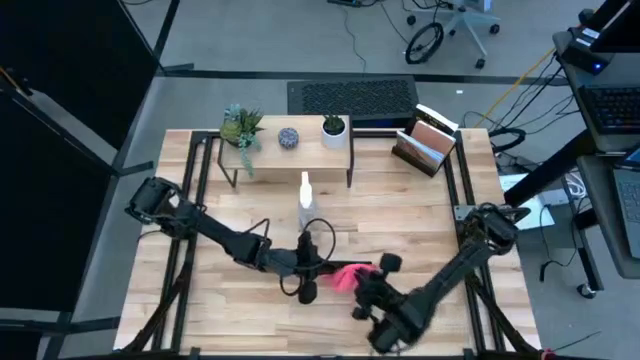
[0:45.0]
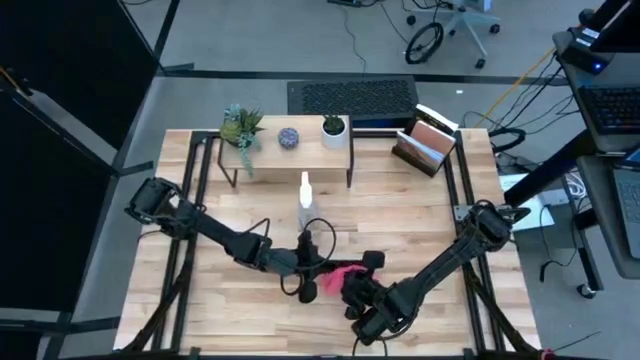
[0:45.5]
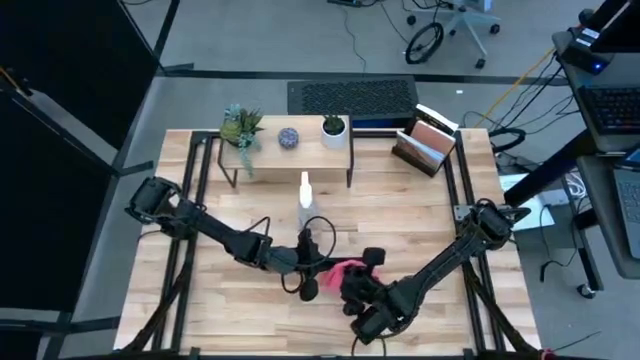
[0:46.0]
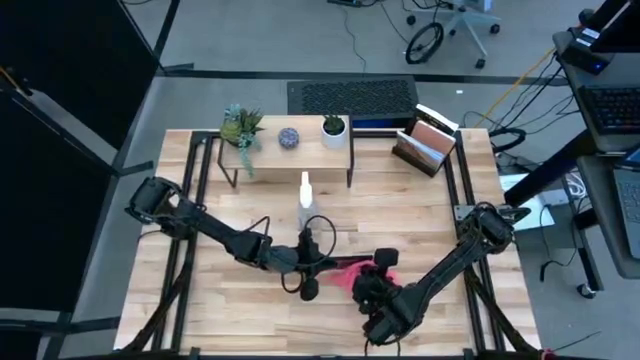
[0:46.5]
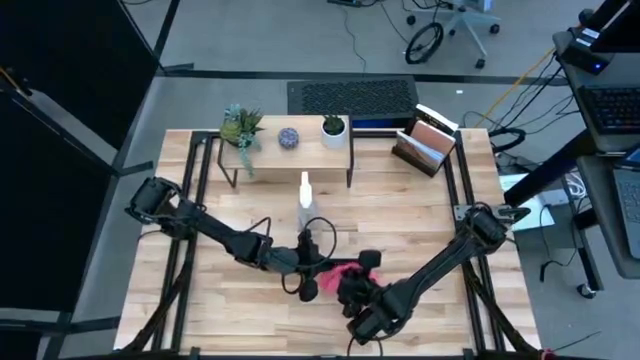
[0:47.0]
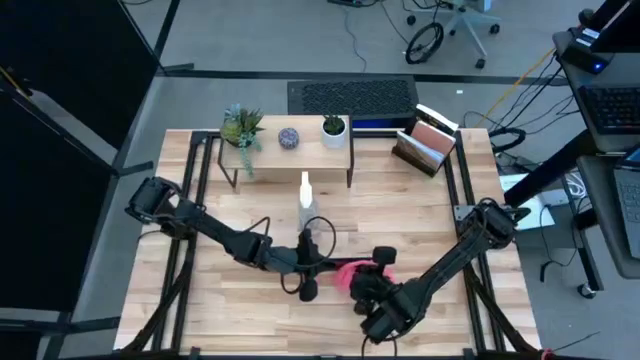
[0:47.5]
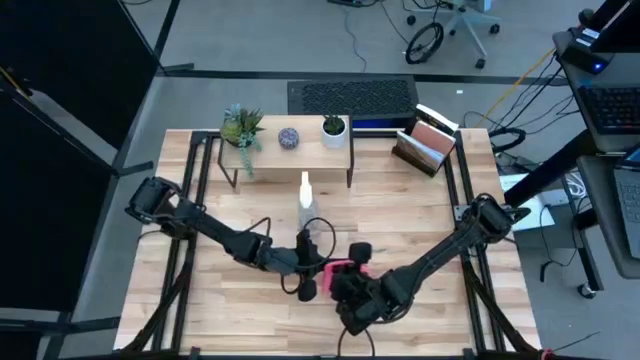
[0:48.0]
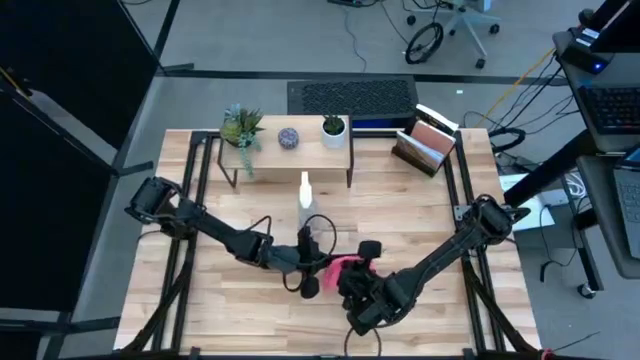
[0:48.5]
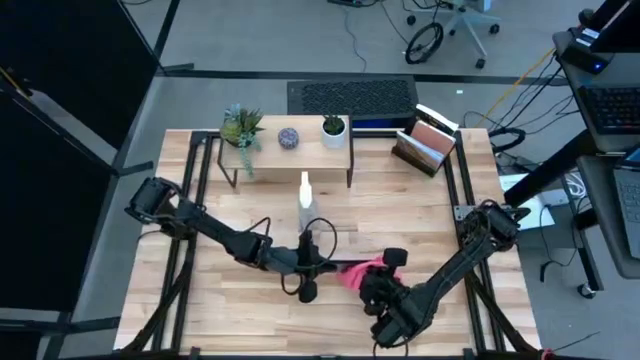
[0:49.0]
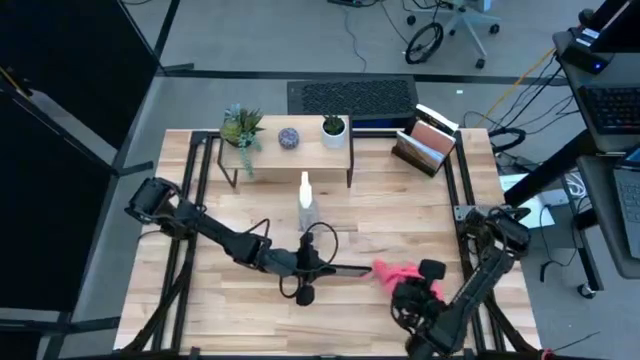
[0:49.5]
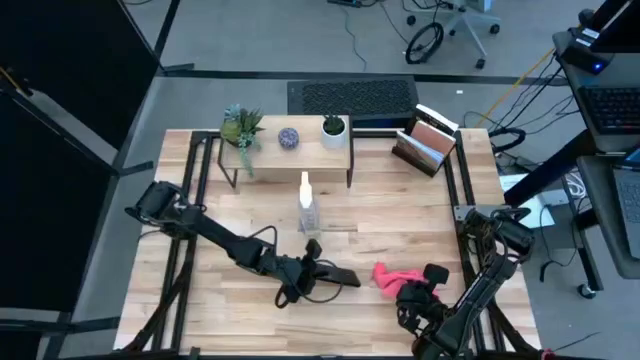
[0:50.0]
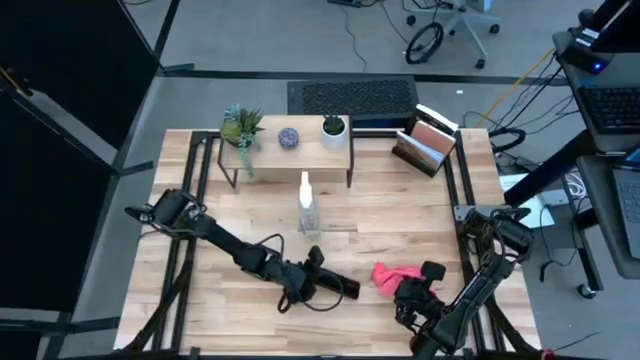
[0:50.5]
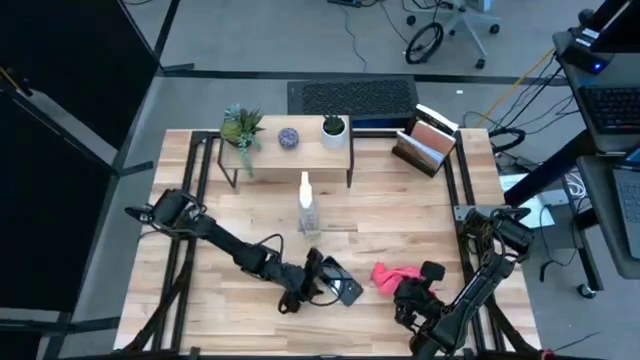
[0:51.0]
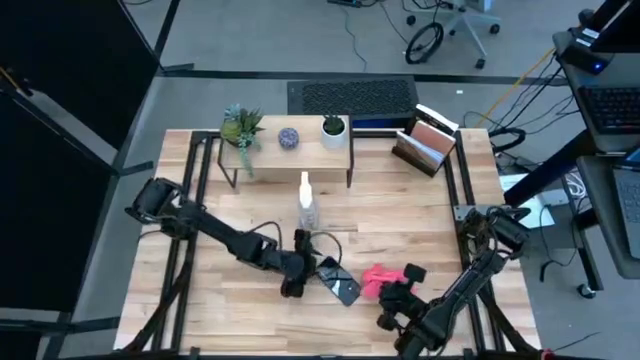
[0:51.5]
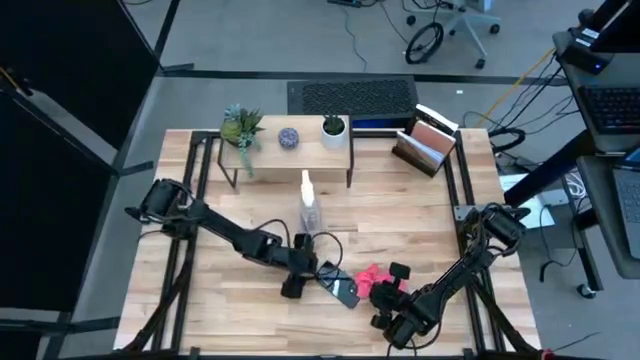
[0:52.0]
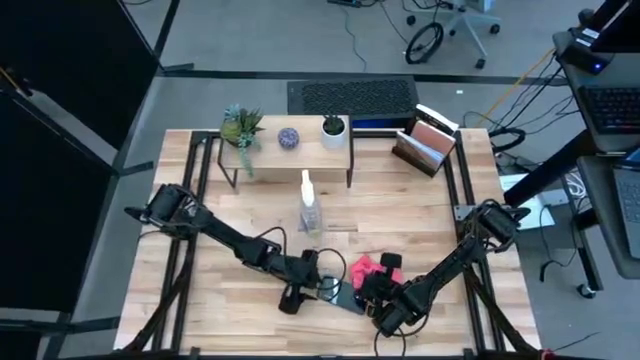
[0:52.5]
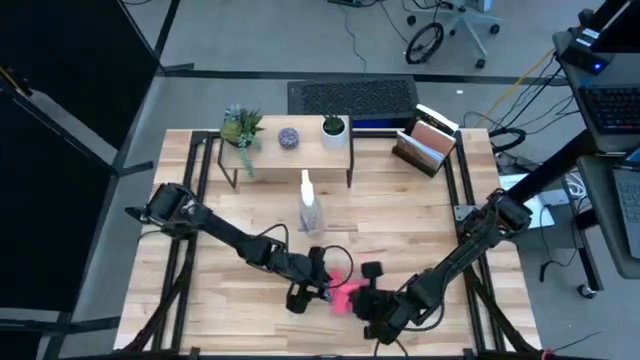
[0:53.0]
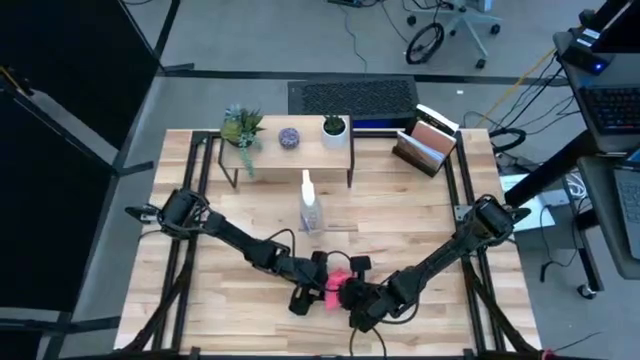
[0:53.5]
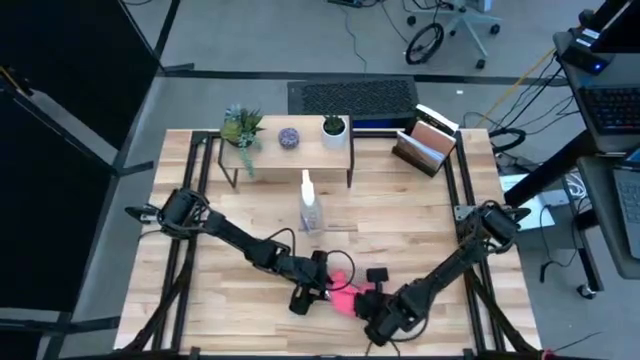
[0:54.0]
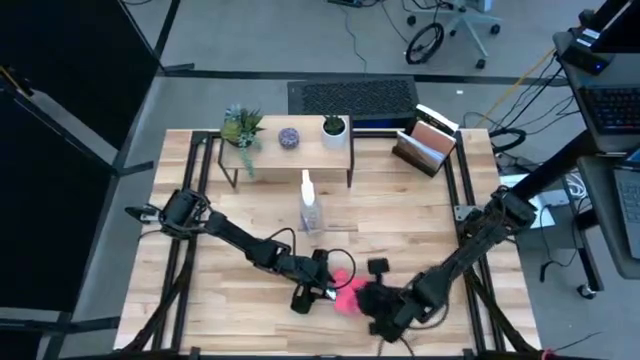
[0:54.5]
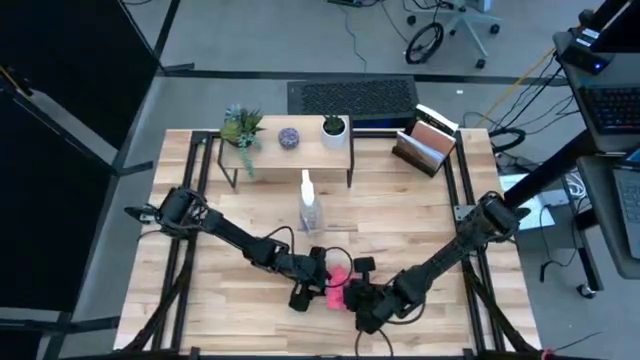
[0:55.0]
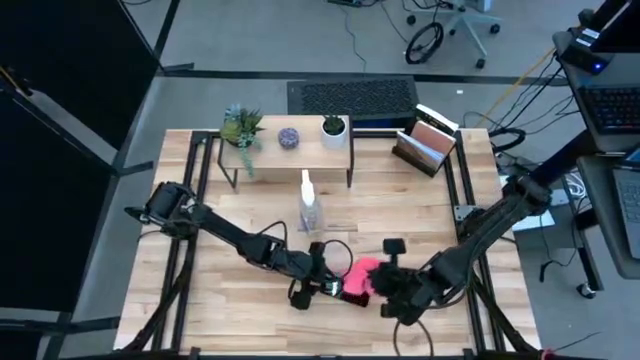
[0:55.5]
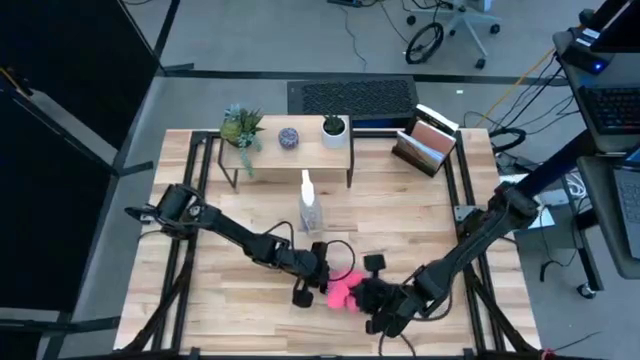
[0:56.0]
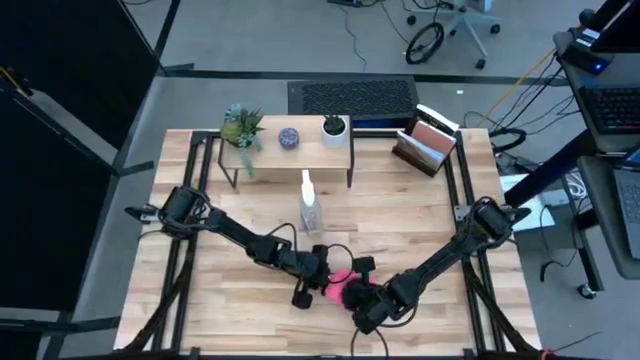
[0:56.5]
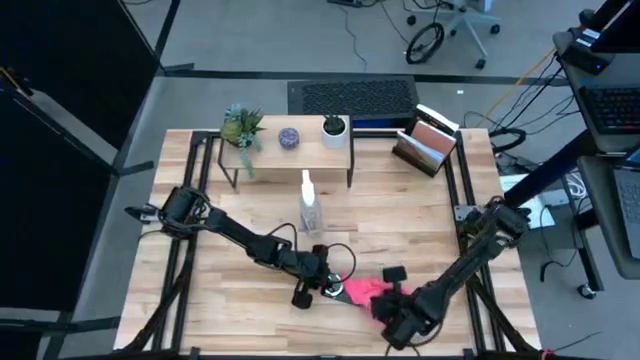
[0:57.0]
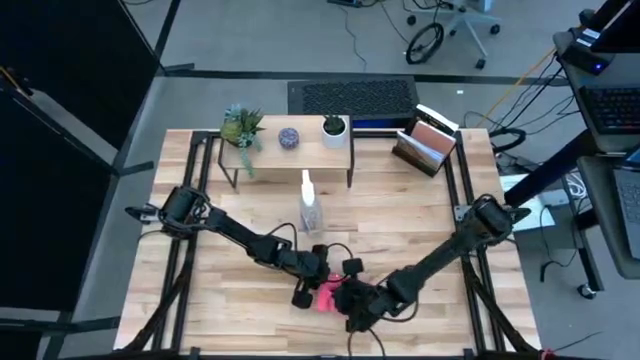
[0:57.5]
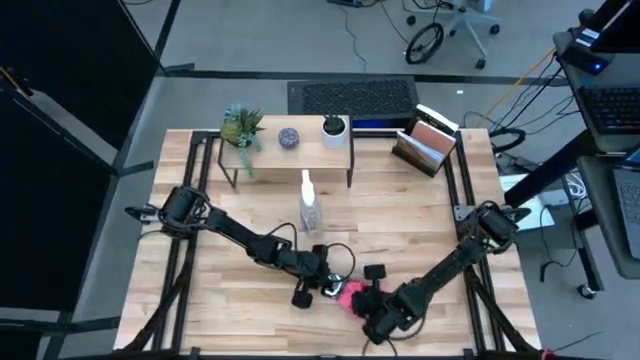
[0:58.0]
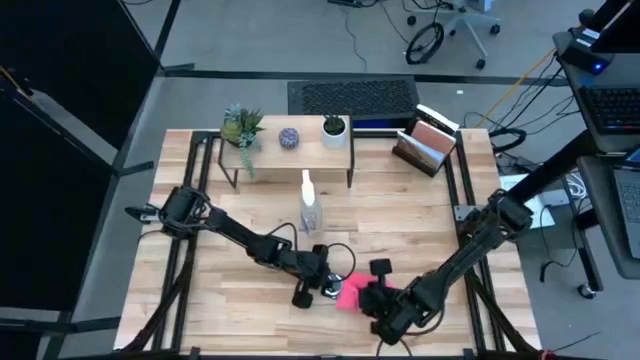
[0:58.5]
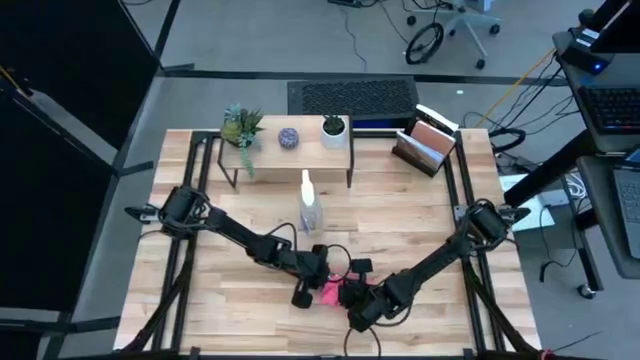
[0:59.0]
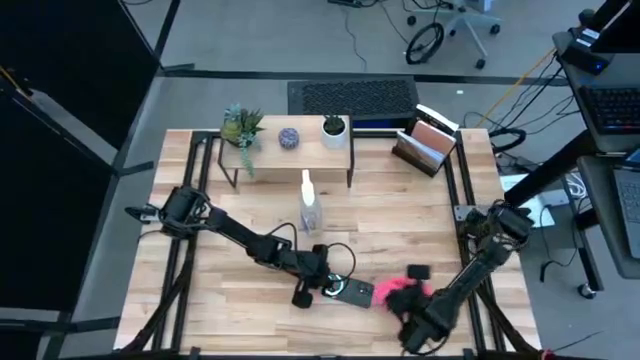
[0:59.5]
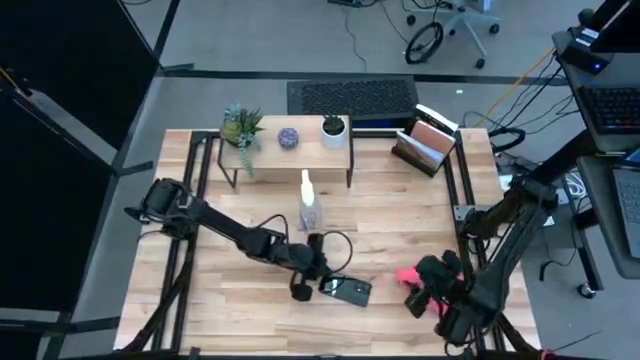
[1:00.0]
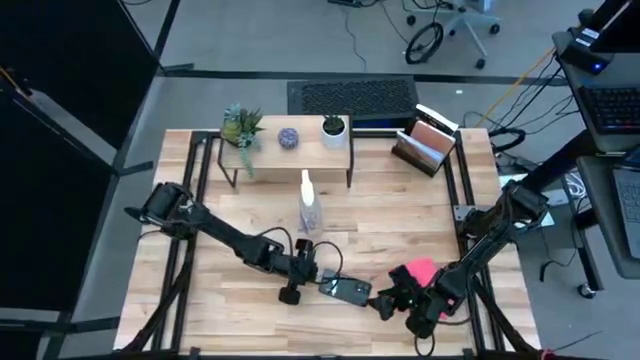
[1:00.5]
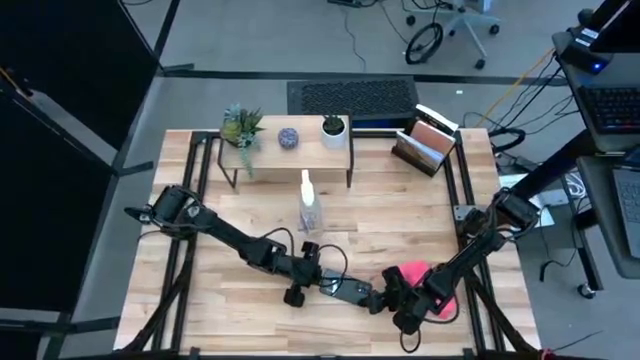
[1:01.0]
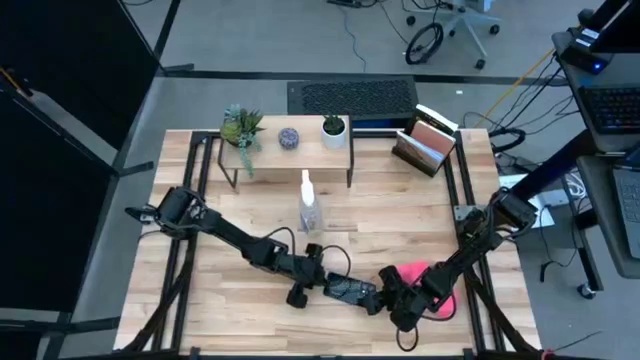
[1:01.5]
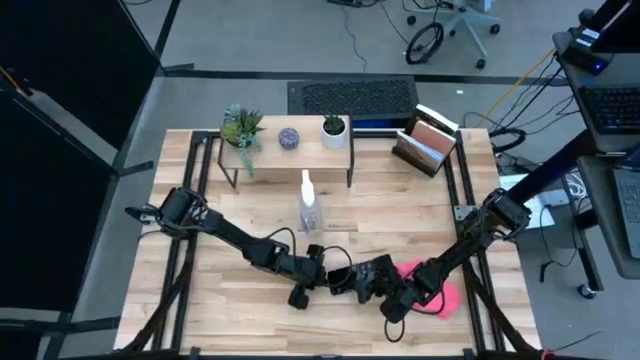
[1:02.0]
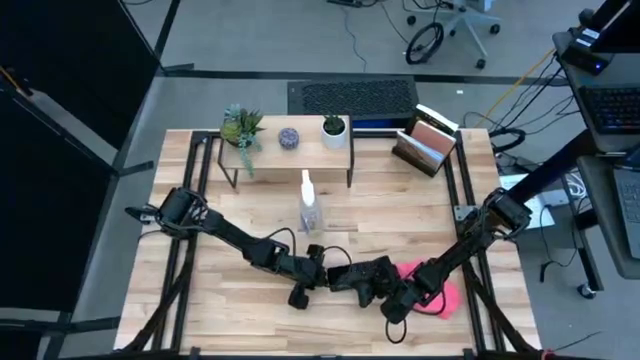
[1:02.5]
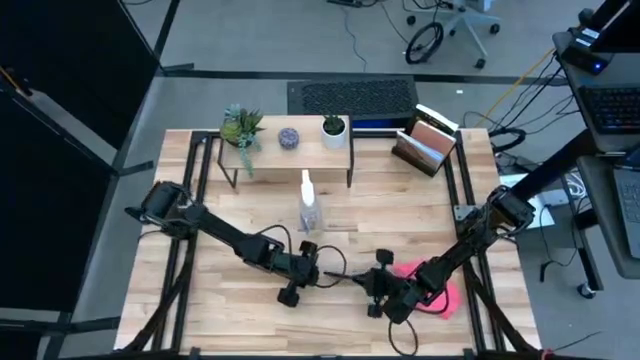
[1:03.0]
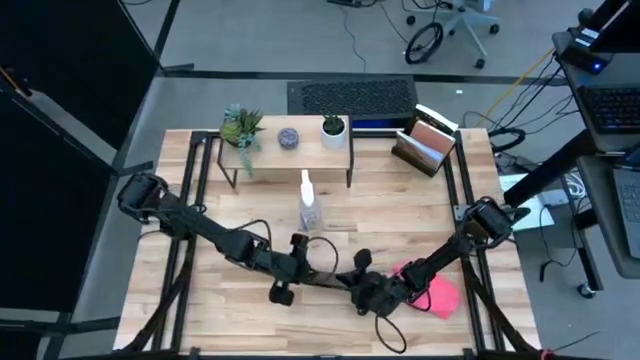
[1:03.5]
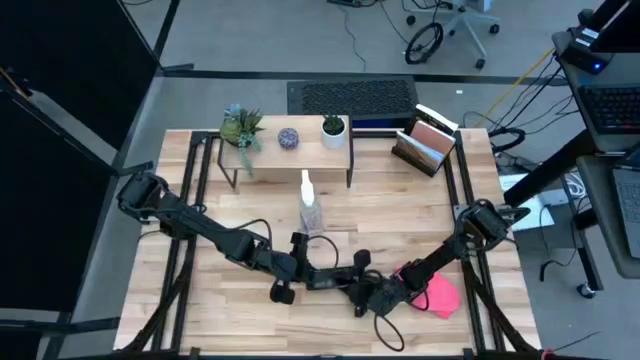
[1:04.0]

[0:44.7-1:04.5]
Task: Apply microfiber cloth
Wipe the black cellphone with the pink microfiber cloth
